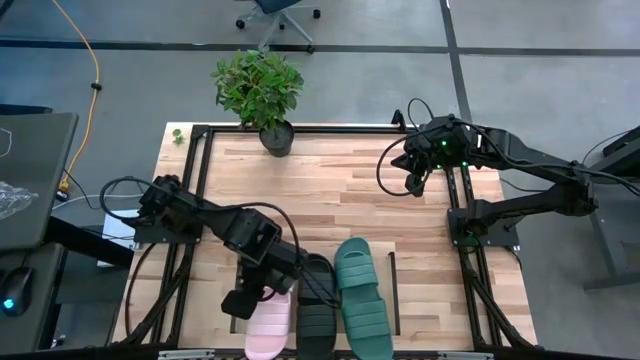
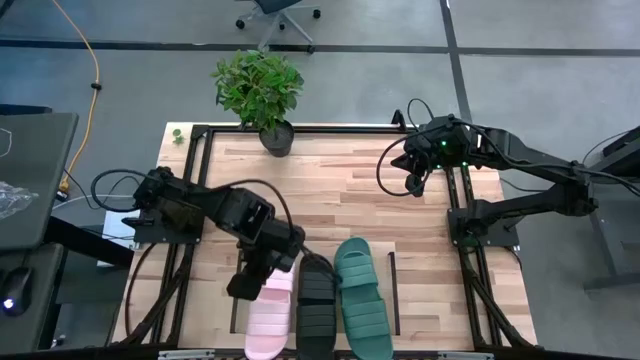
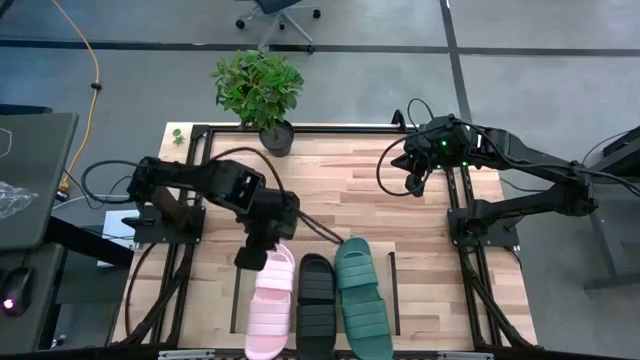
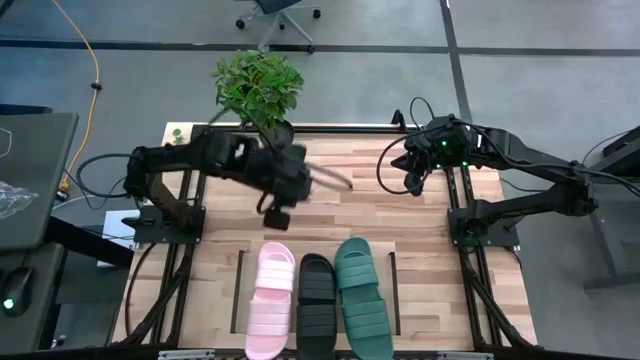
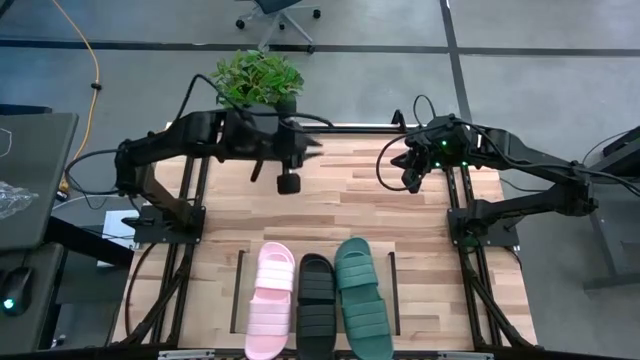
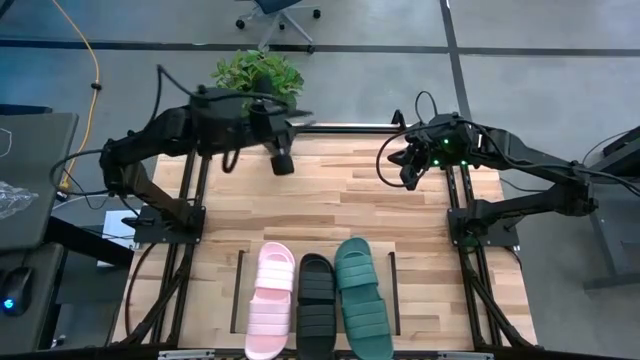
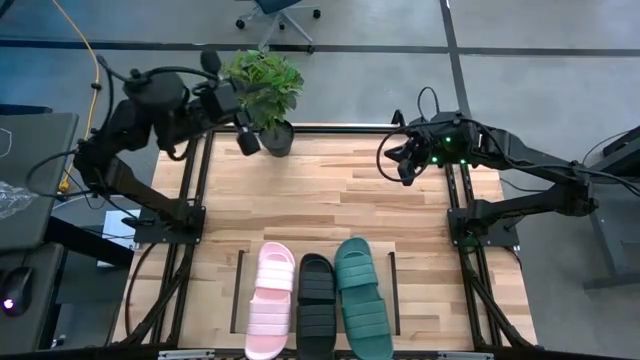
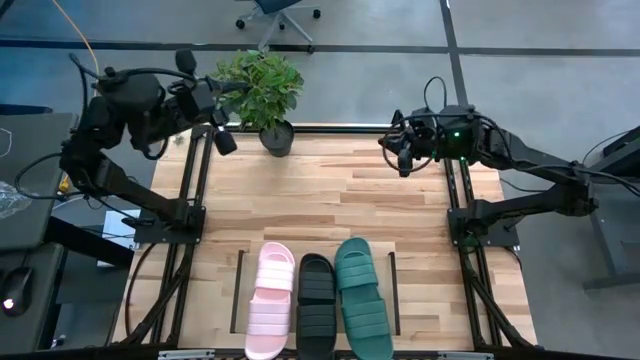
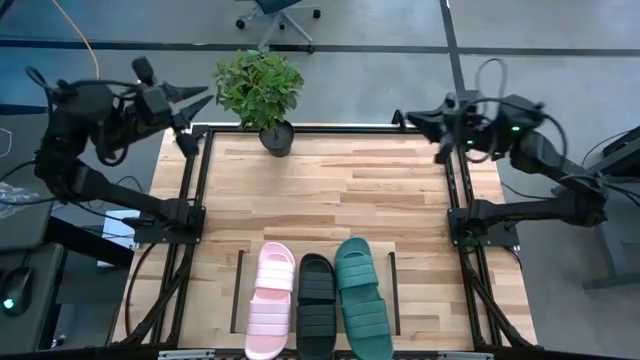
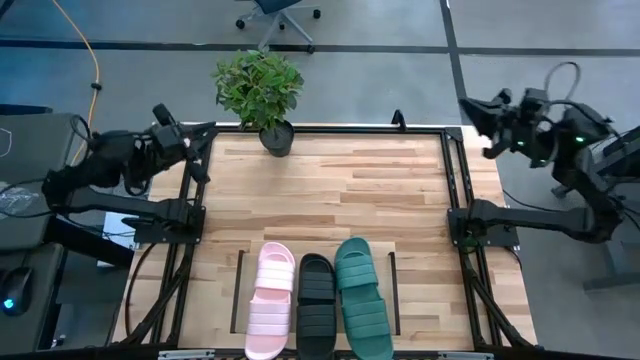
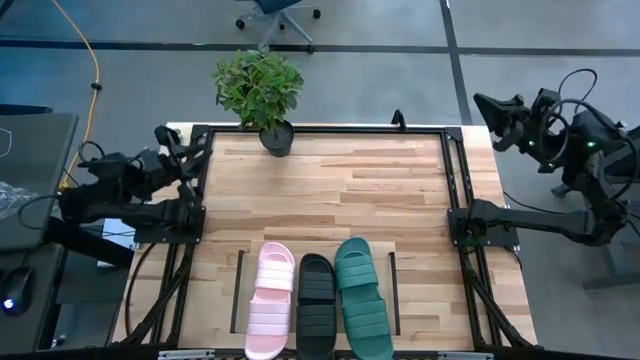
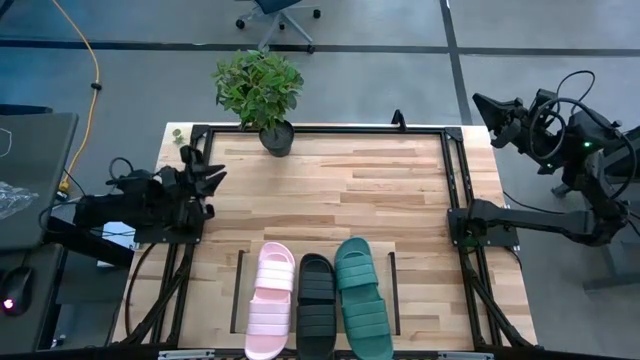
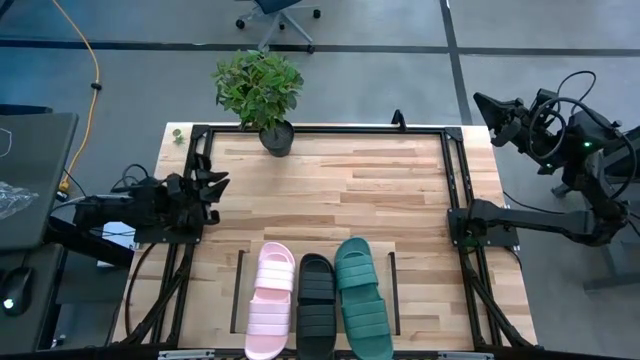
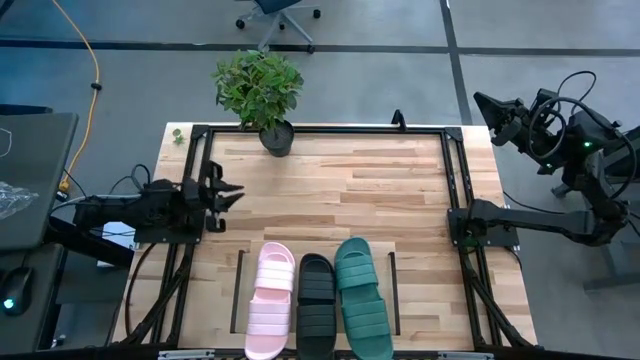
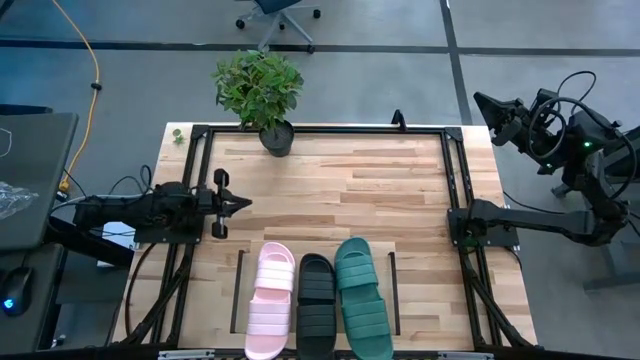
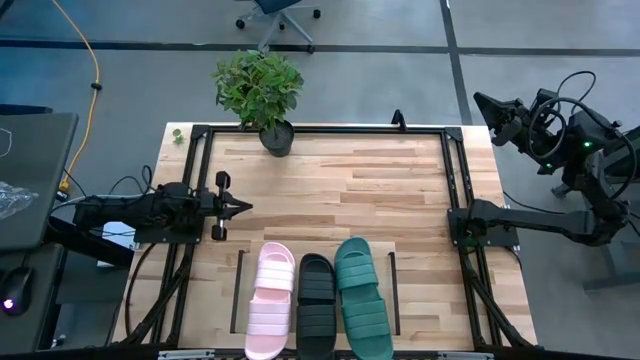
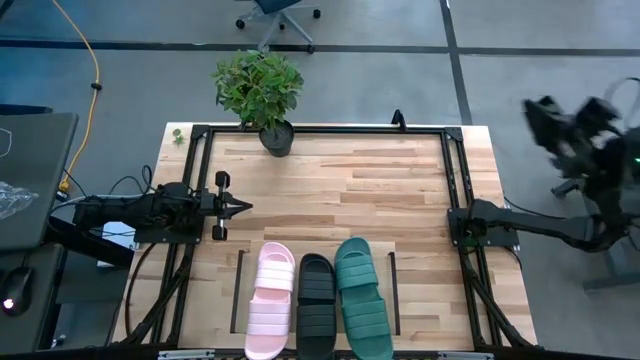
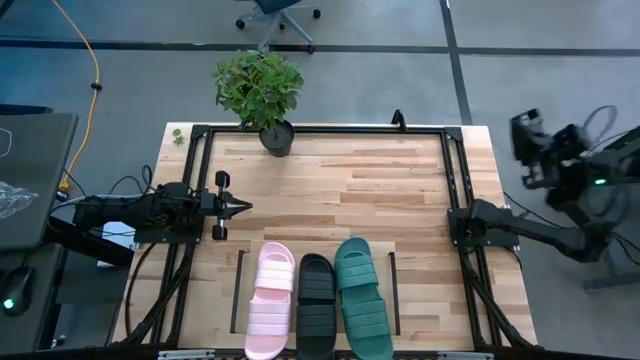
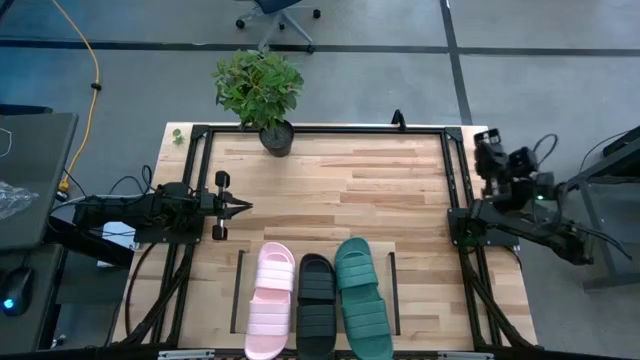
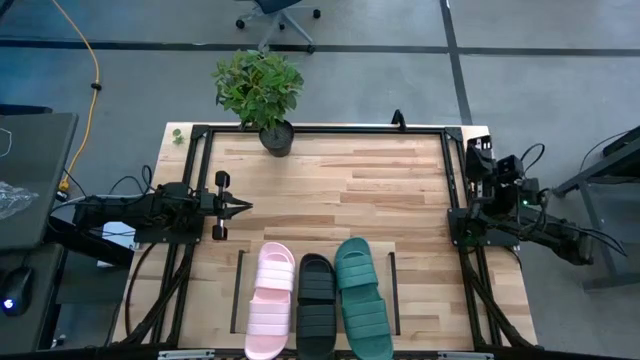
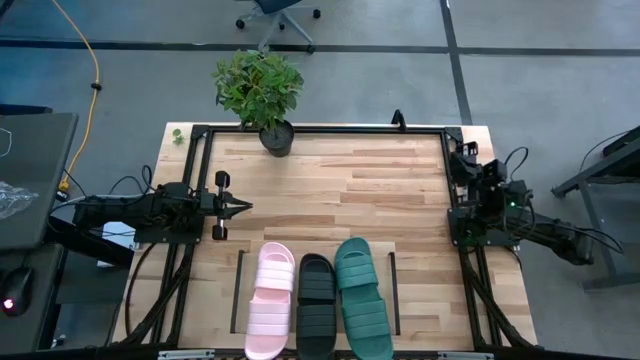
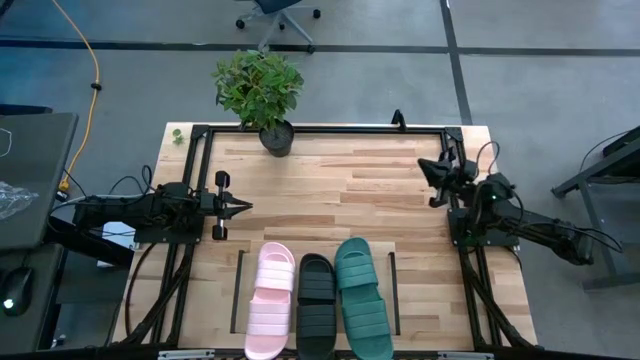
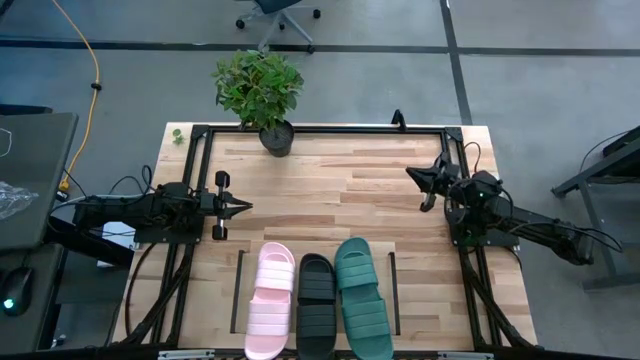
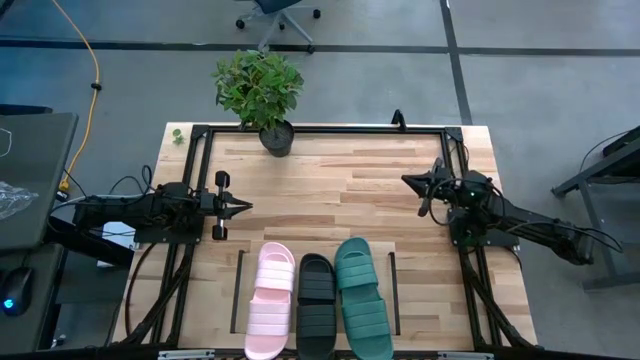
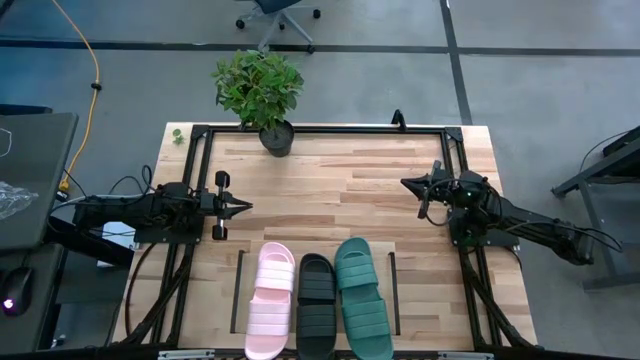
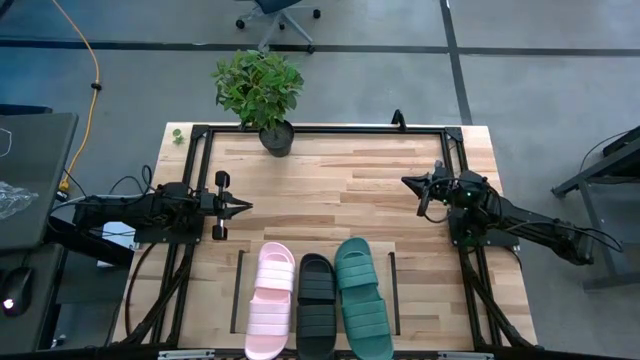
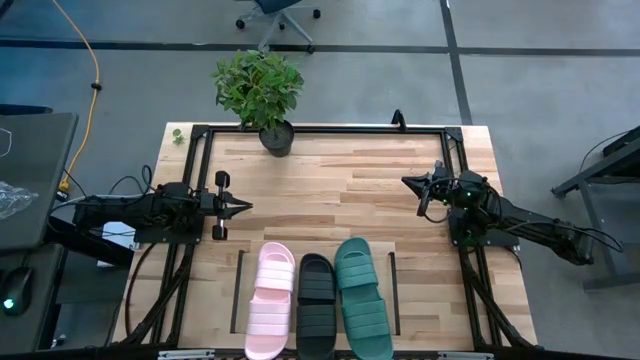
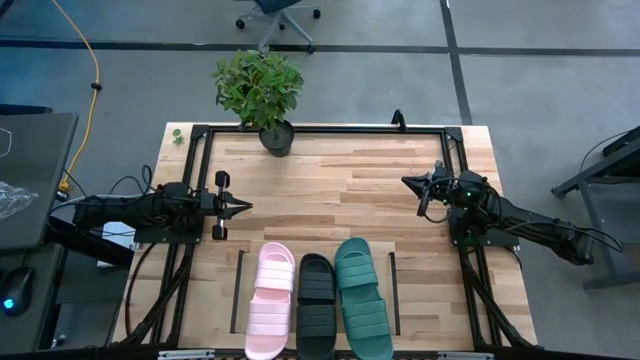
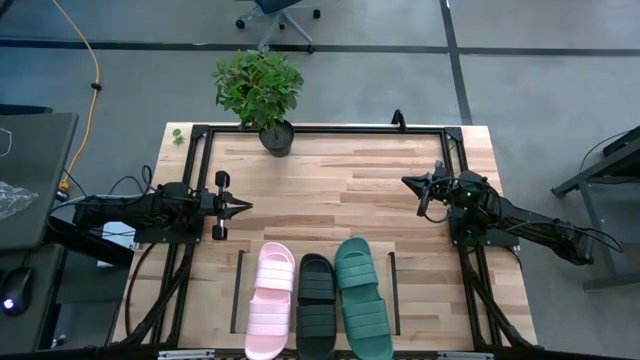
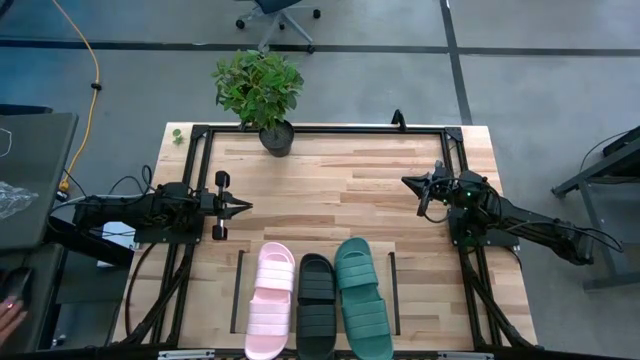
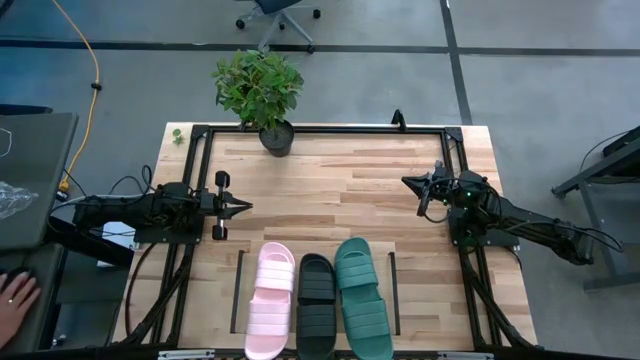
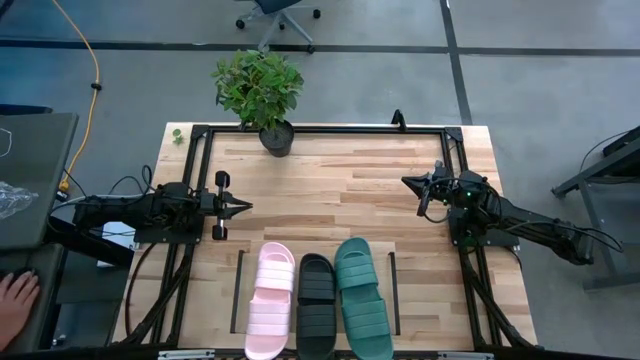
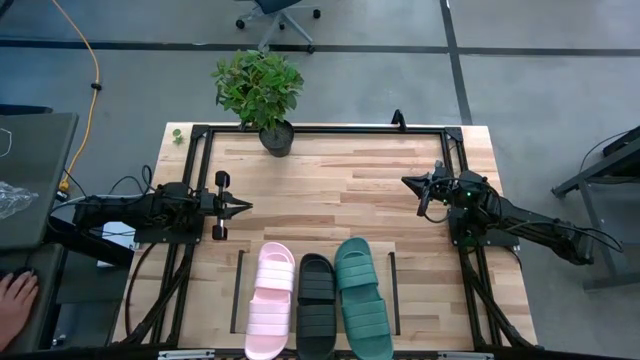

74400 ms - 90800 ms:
Task: Pick and place slides into the shelf
Return to Home Position

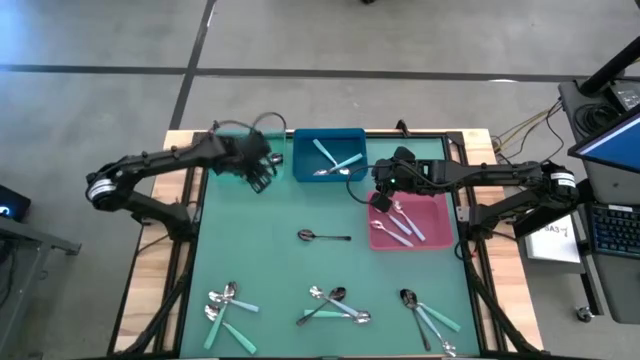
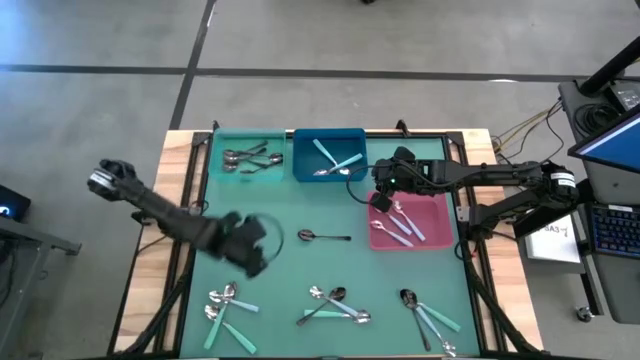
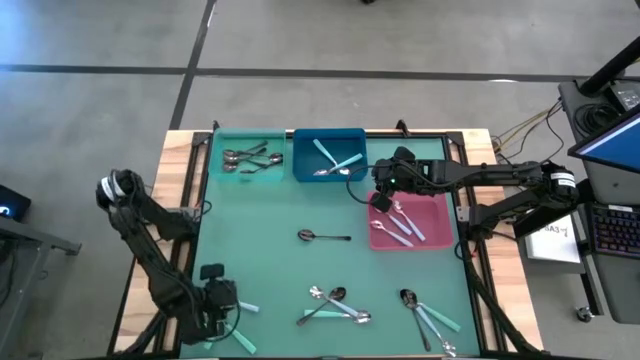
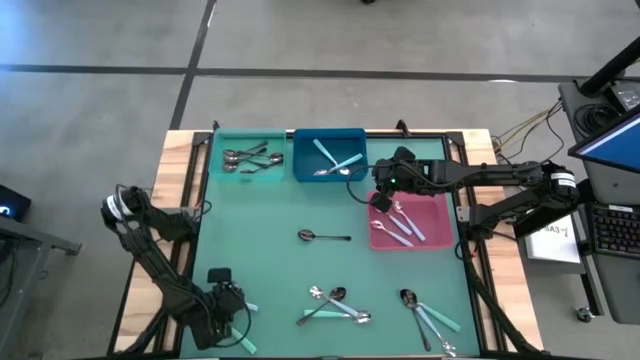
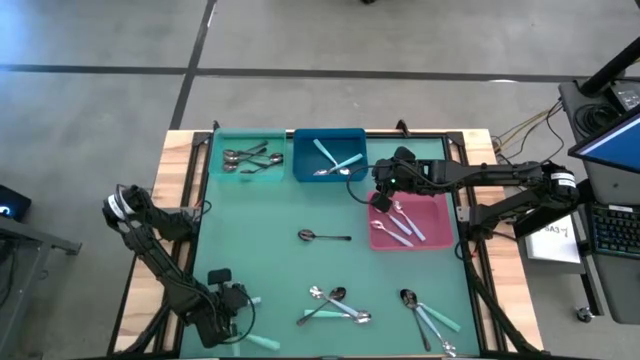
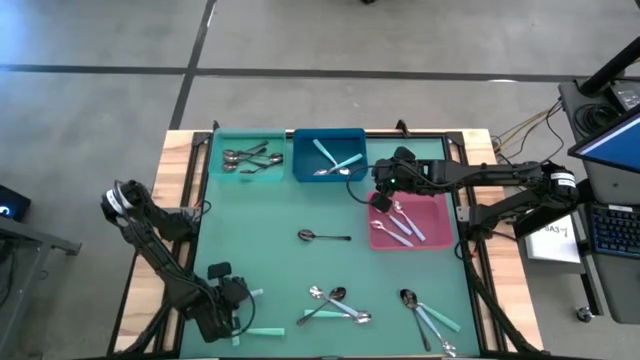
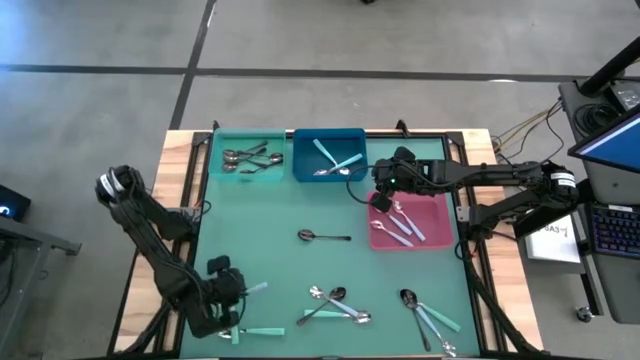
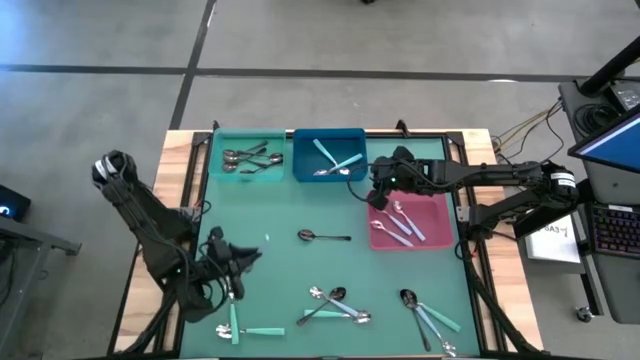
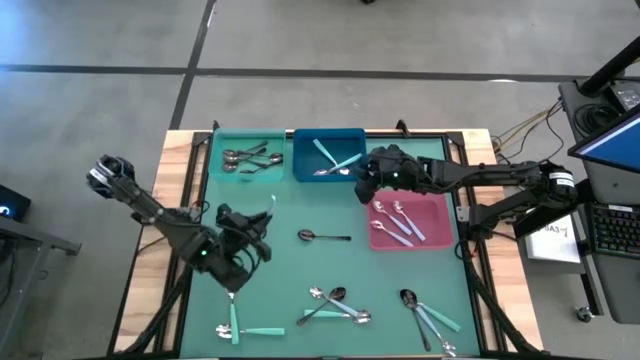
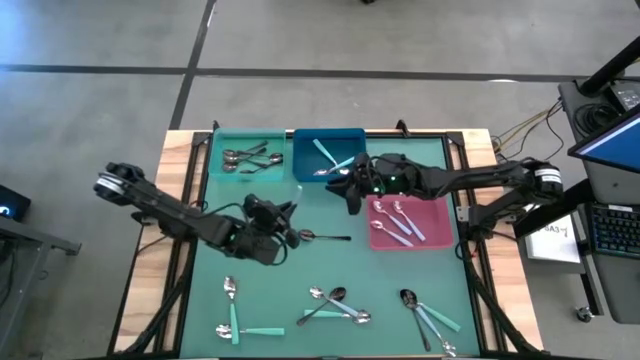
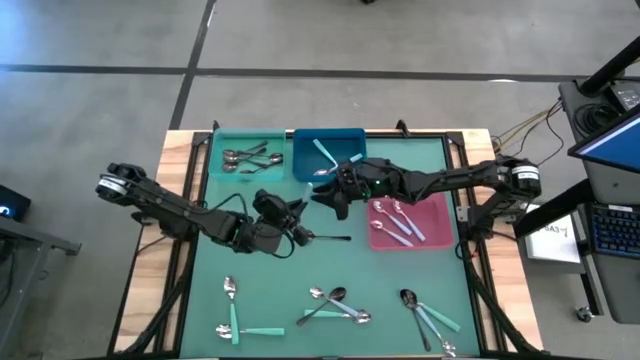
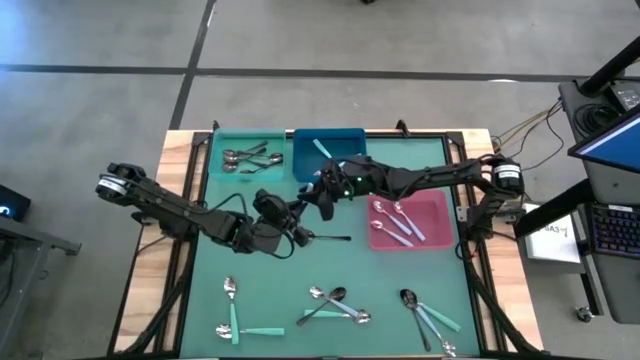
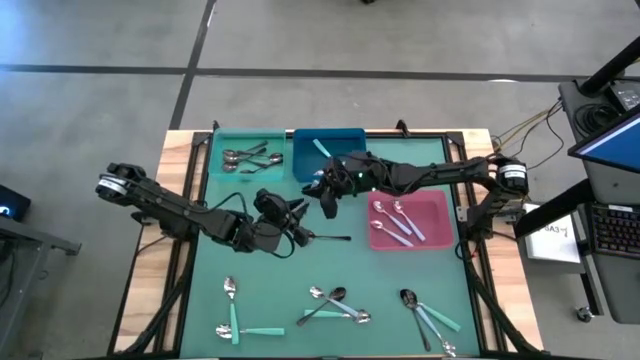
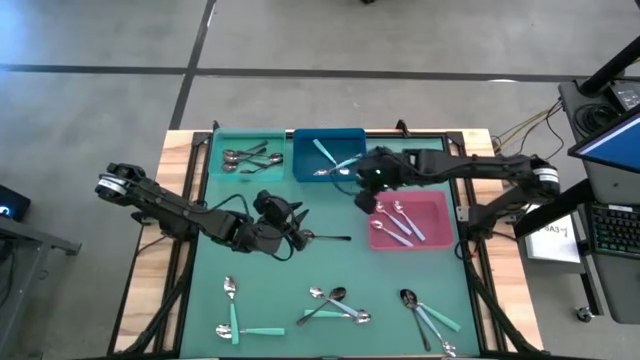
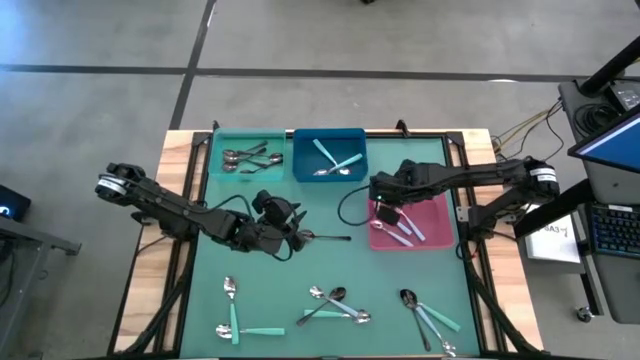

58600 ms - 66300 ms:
Task: Sort silverware by color (type)
Put the blue spoon into the red bin
